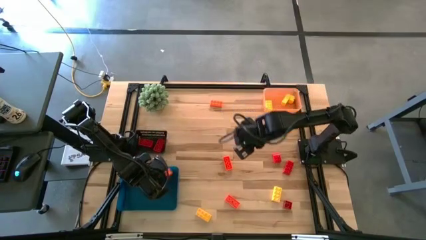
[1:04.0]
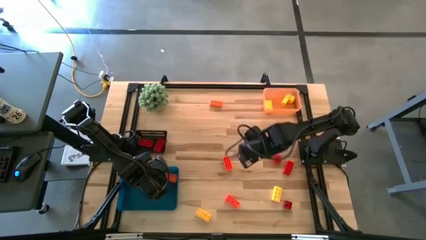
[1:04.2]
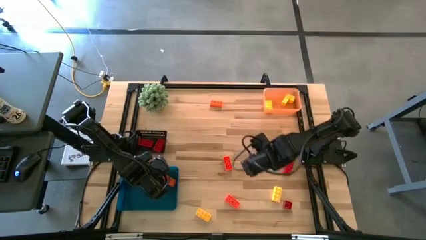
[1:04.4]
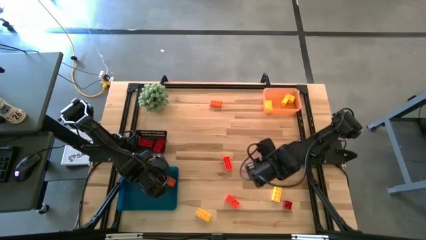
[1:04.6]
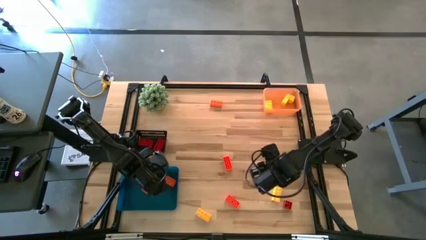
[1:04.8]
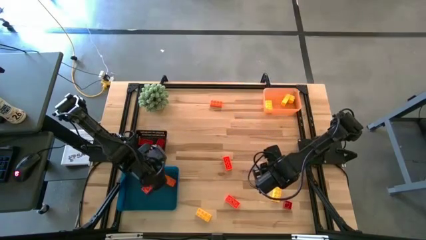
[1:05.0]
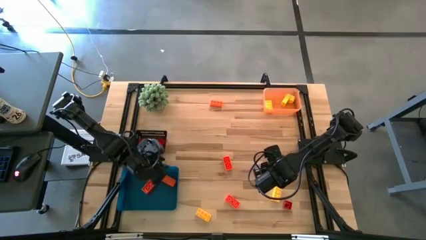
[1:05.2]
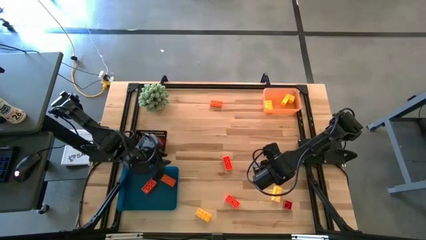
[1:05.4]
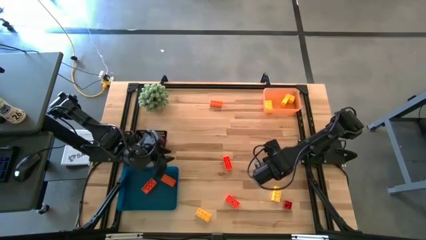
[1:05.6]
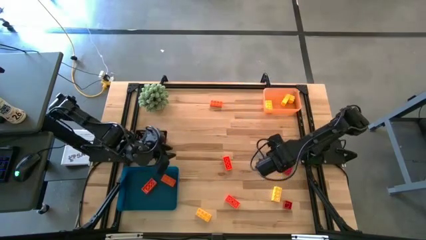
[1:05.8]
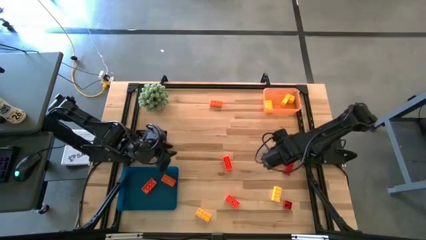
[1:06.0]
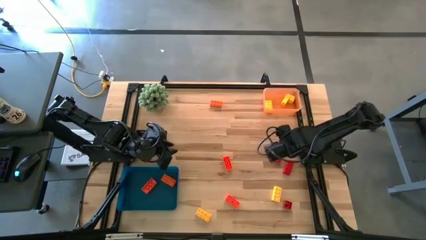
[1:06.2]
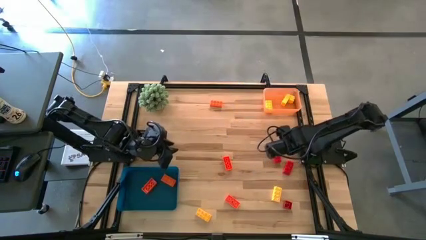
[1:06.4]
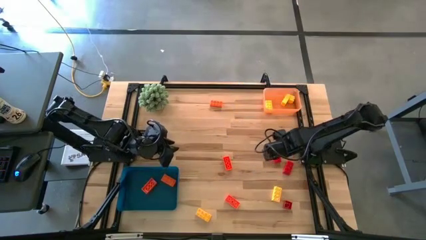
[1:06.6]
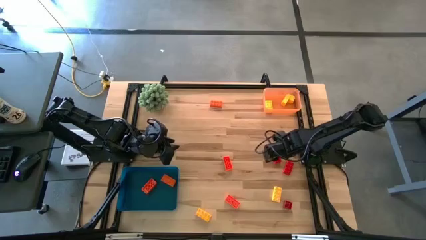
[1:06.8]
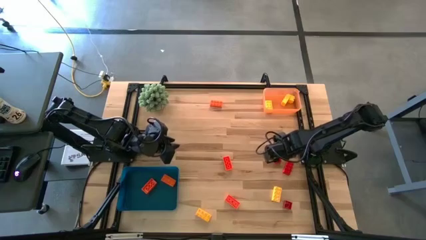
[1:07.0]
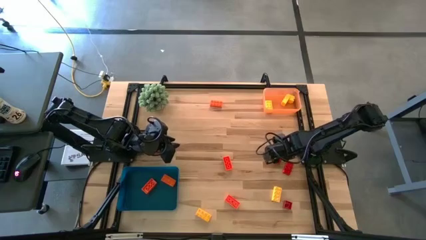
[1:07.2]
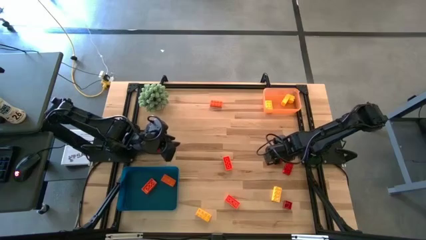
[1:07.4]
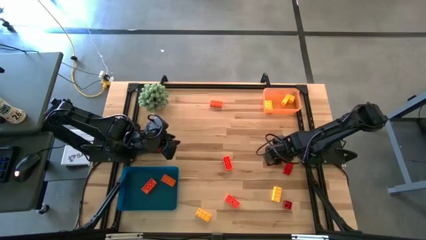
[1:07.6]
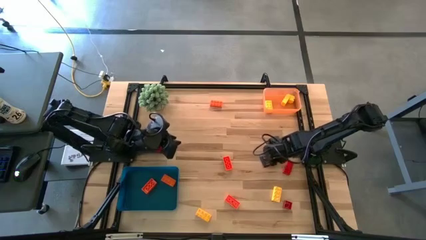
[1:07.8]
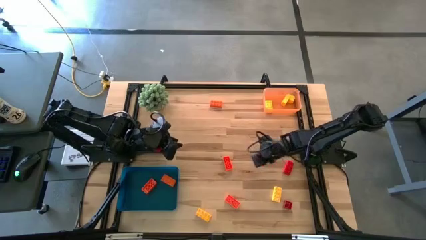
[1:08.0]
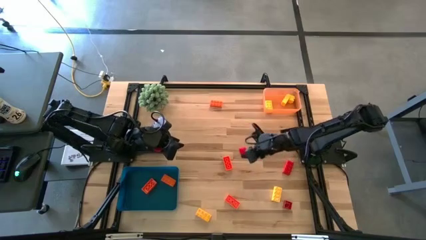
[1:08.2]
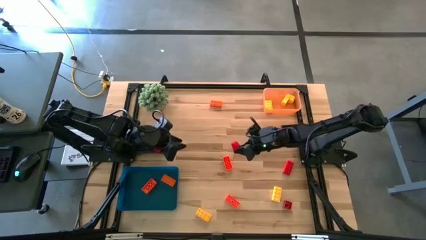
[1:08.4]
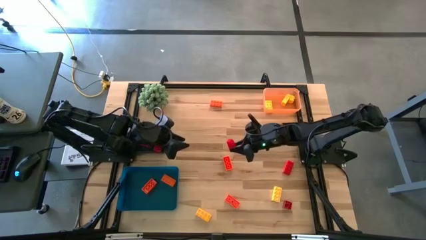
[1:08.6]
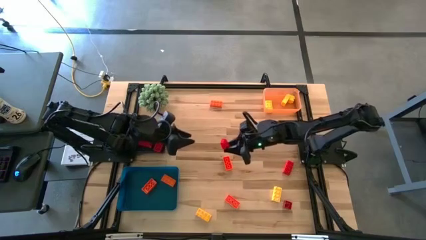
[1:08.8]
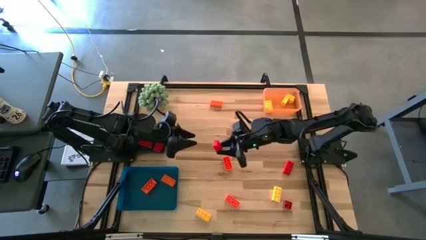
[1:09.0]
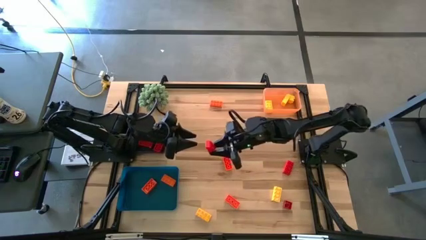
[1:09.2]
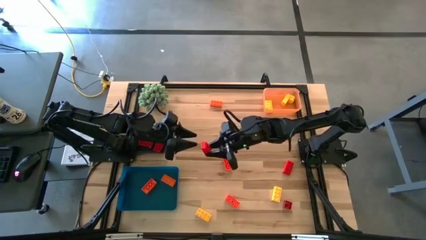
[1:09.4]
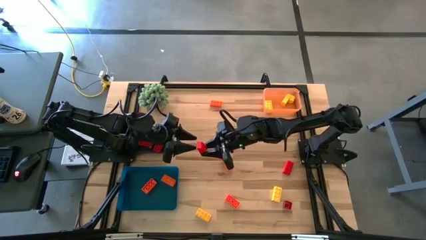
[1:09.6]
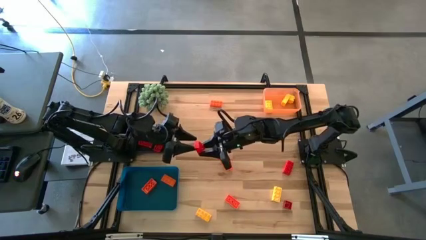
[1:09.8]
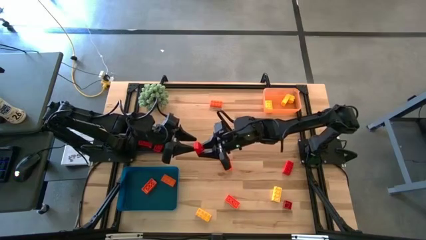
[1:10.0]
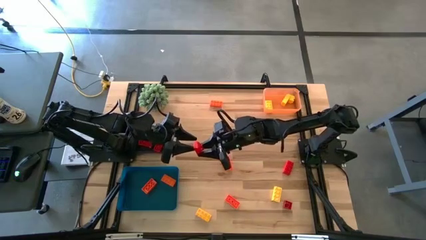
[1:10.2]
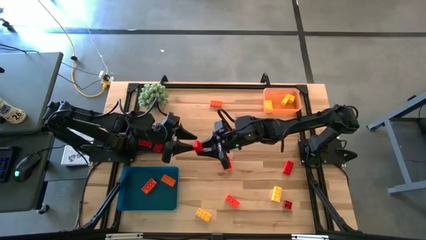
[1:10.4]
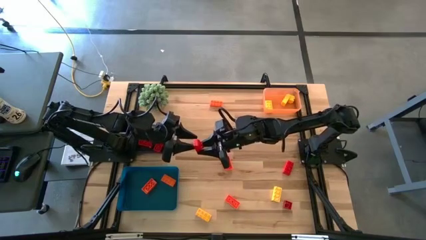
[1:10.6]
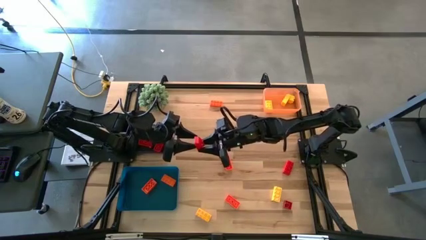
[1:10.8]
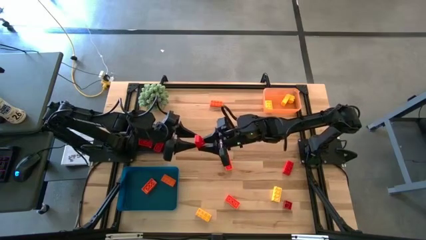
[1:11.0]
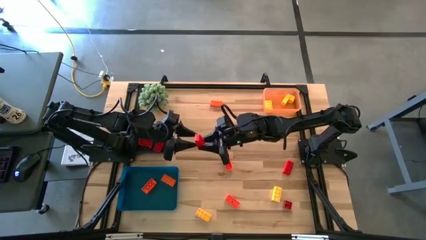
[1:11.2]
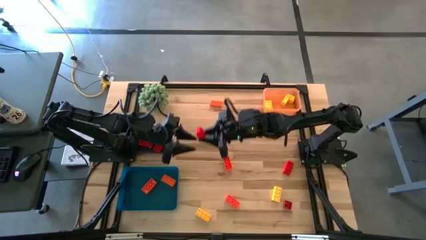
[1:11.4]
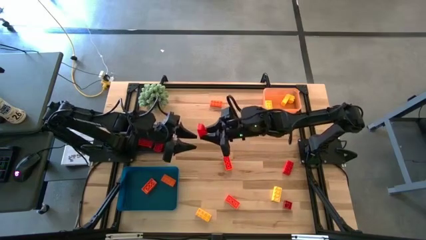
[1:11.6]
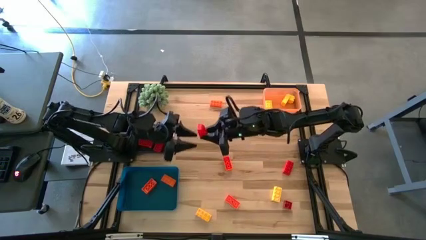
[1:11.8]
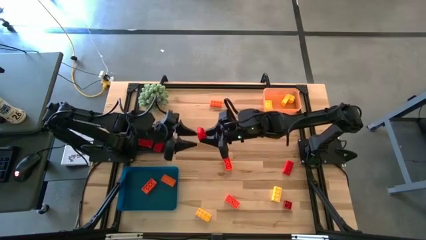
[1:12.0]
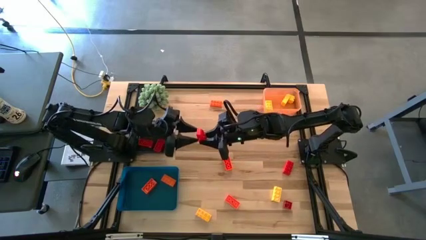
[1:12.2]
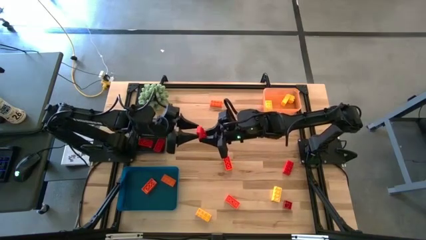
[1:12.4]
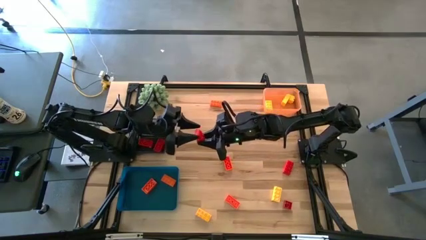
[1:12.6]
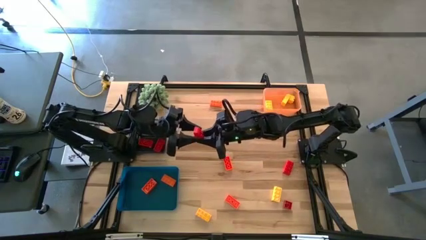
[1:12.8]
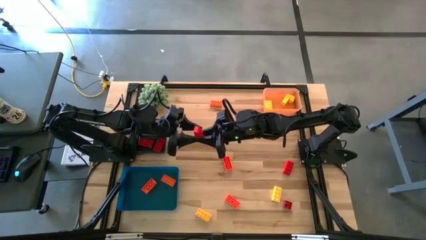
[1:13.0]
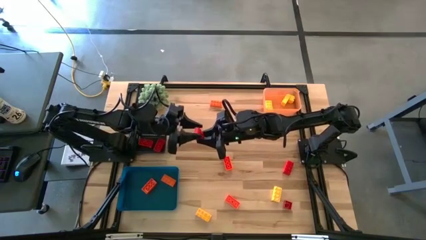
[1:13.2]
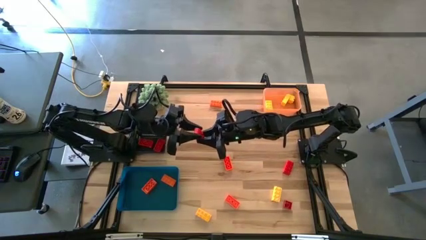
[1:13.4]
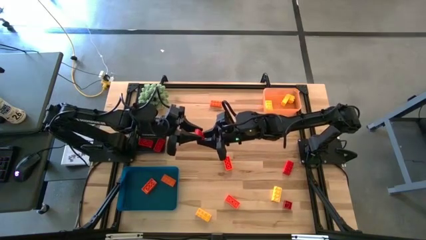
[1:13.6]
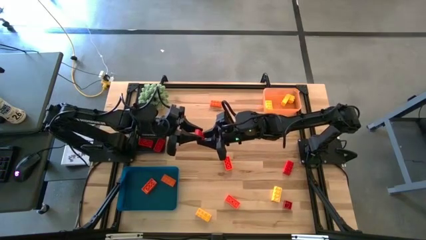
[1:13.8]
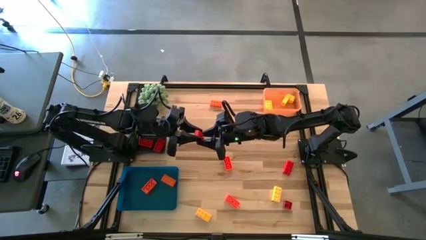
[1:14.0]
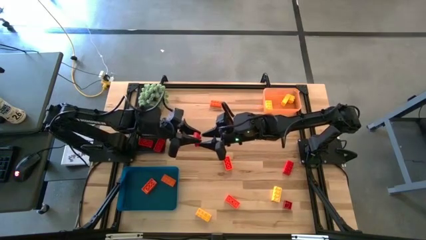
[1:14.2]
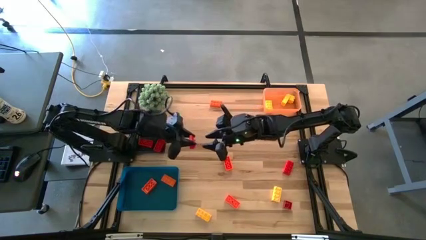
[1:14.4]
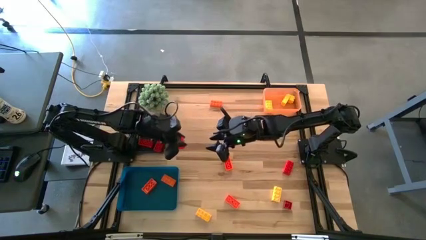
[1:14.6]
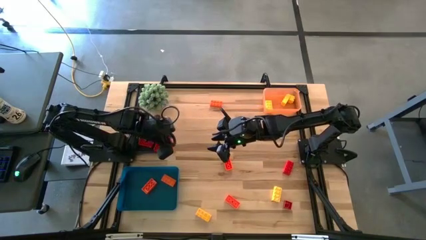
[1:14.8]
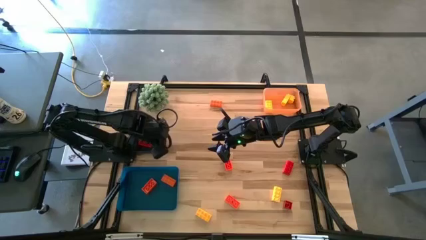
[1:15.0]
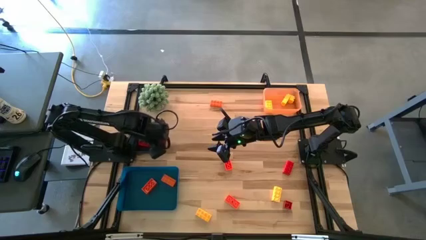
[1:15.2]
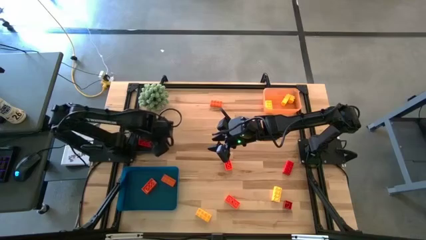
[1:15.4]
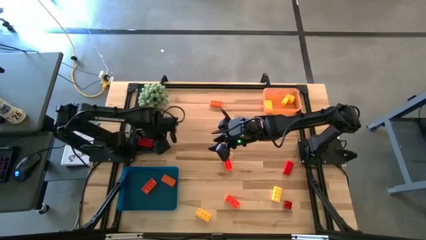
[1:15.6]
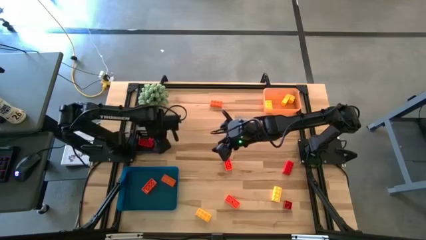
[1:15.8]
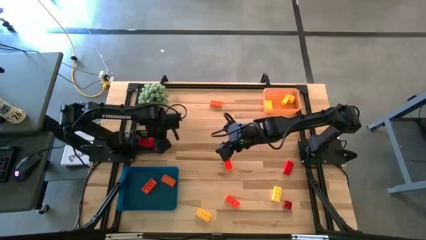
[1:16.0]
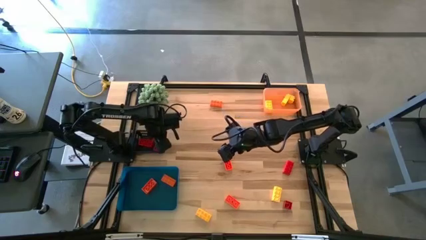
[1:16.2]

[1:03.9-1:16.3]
Task: Sort & place blocks by color
Put the red game piece into the black bin

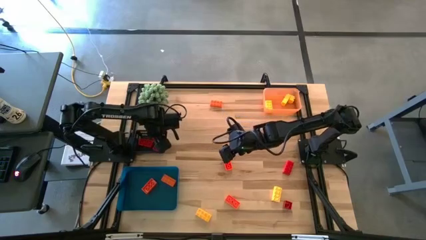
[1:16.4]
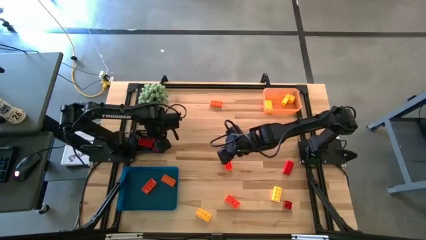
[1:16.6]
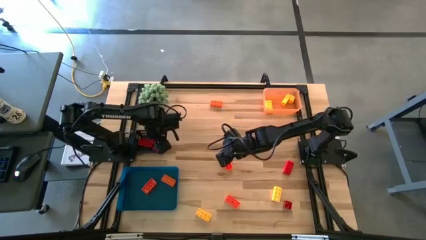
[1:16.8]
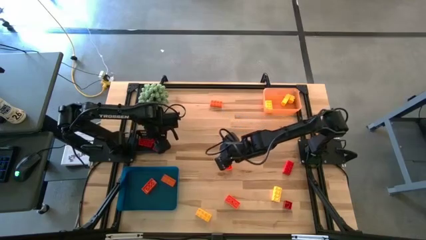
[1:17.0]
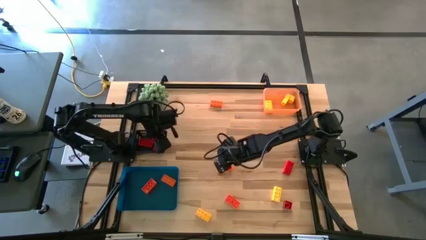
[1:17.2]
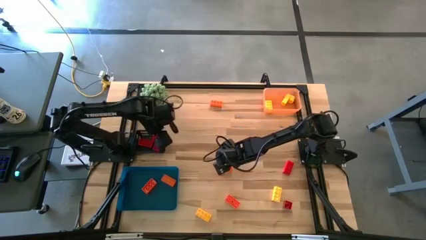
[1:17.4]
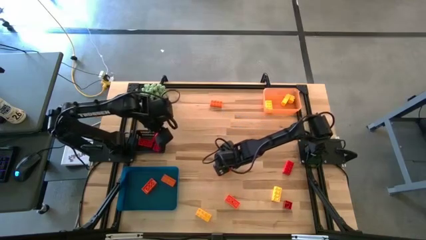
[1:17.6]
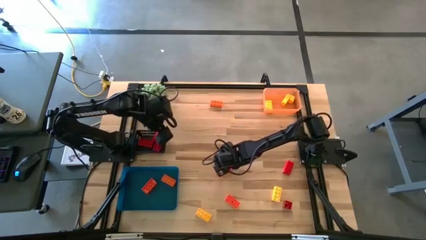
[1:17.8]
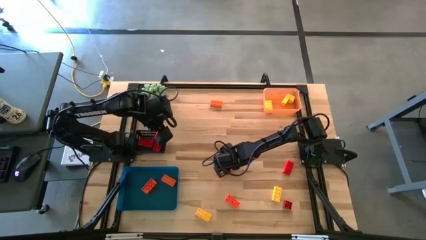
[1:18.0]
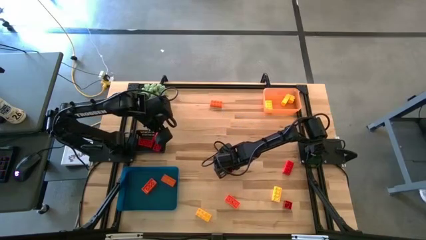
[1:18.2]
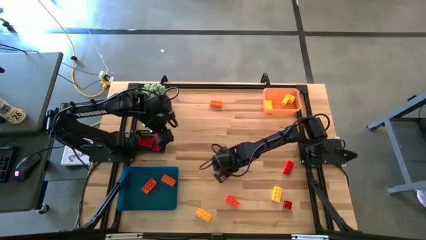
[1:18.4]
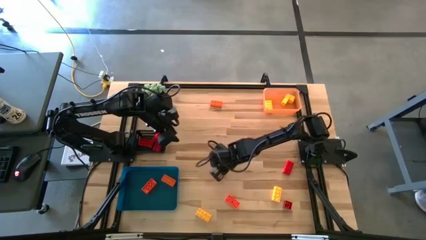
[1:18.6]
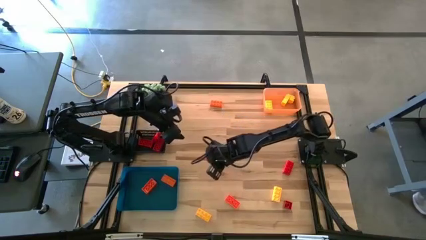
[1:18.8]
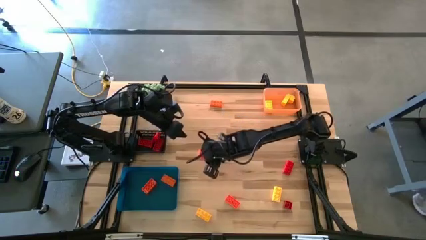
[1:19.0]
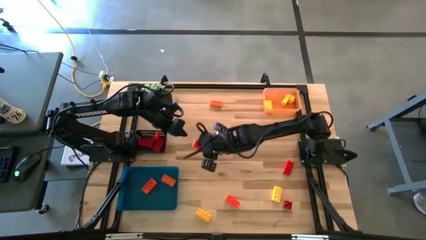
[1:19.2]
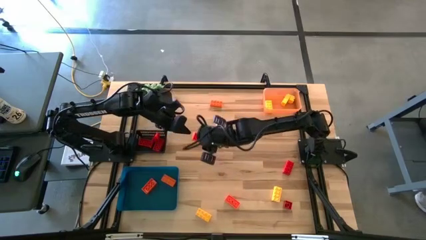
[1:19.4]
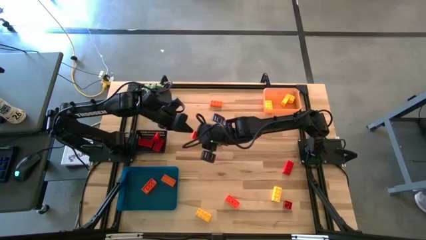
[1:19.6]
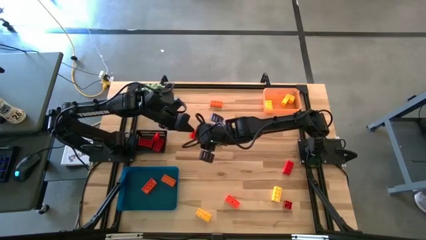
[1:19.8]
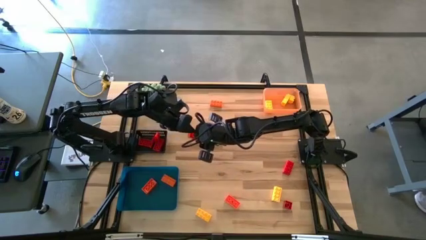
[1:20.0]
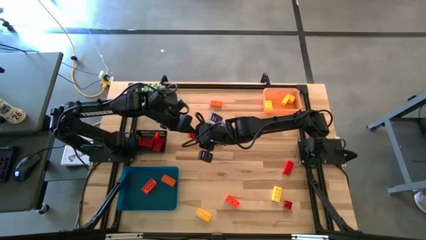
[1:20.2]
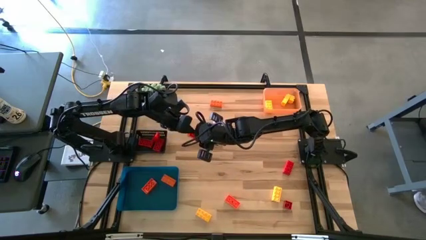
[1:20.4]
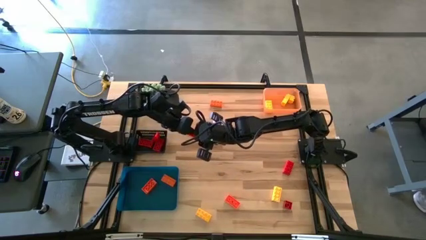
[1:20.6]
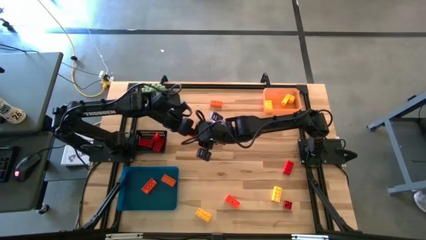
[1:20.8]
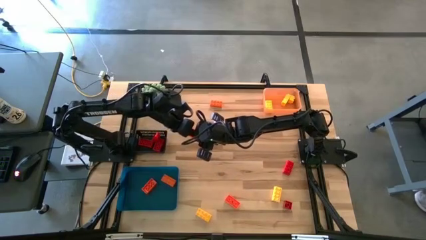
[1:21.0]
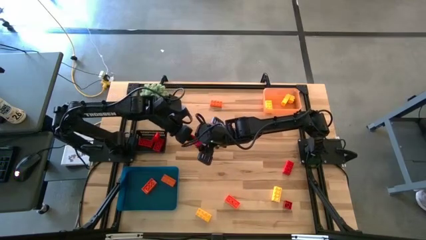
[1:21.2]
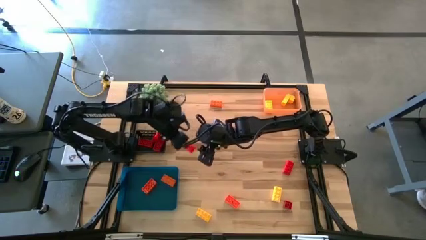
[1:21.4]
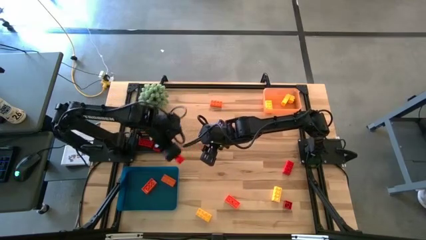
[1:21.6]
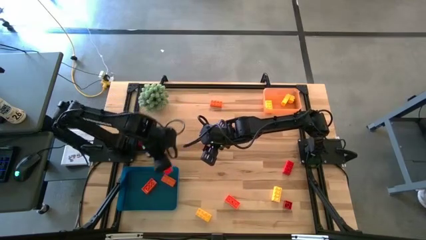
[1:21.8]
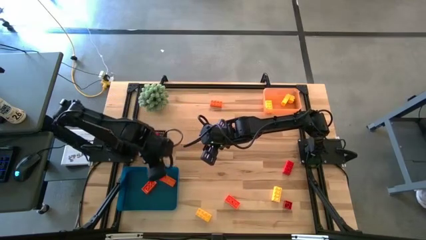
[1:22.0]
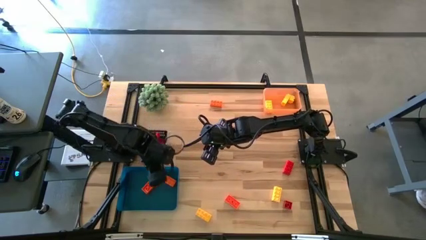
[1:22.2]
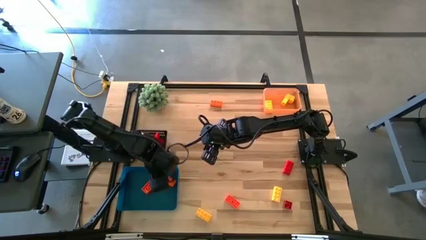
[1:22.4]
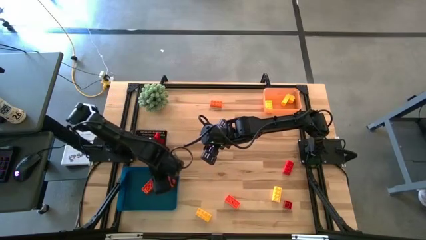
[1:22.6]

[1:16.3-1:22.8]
Put the orange game piece into the blue bin
